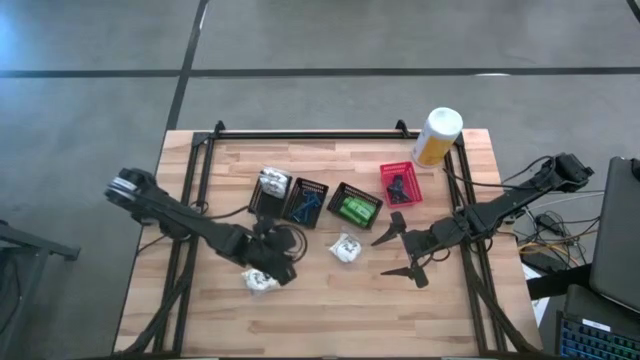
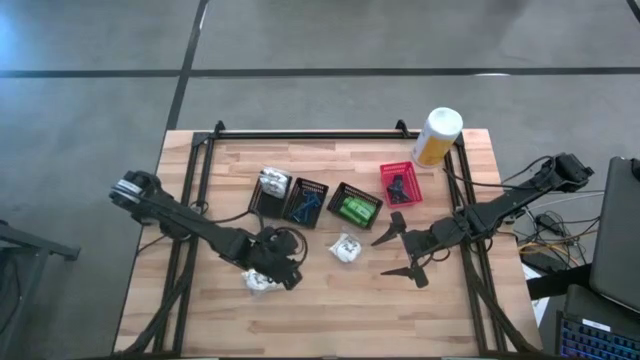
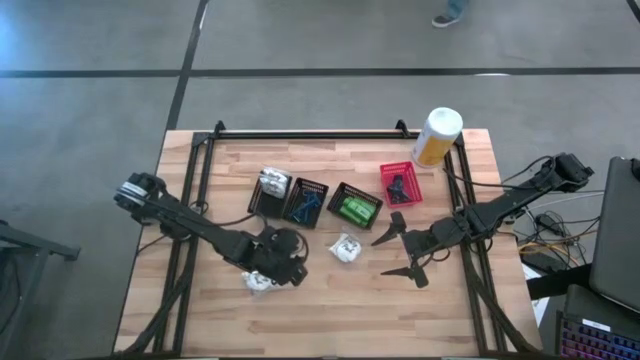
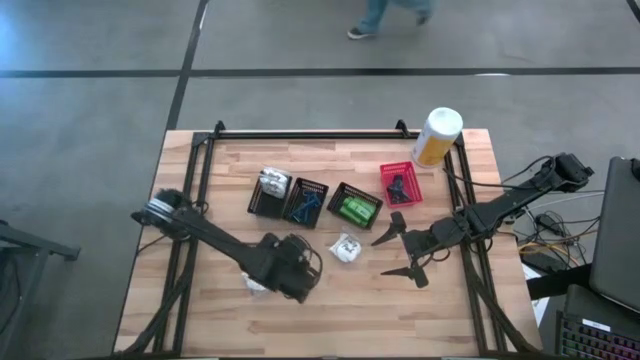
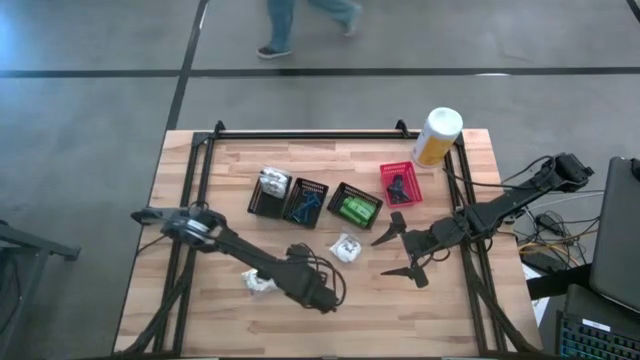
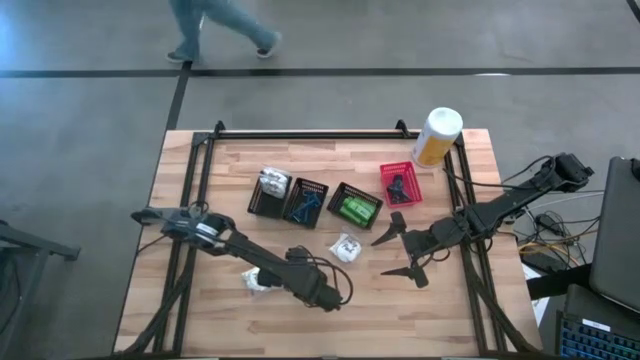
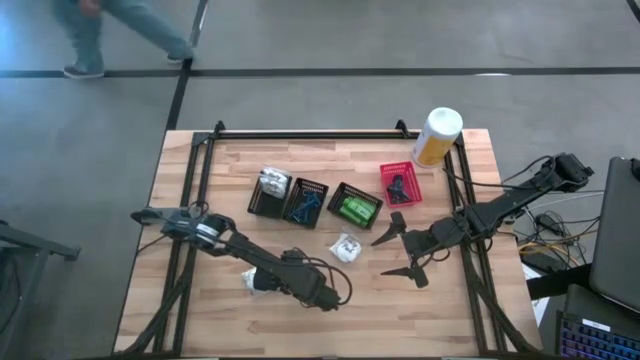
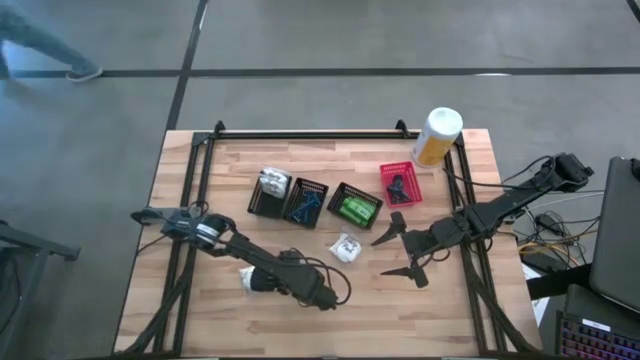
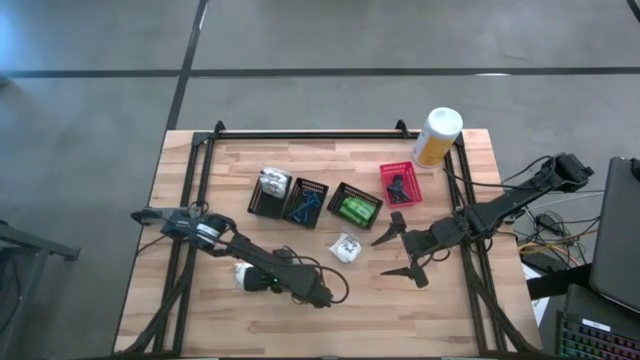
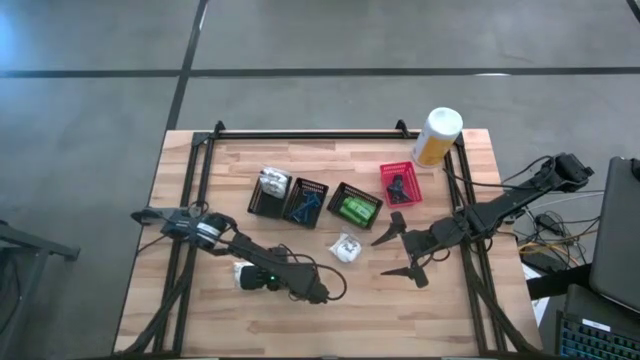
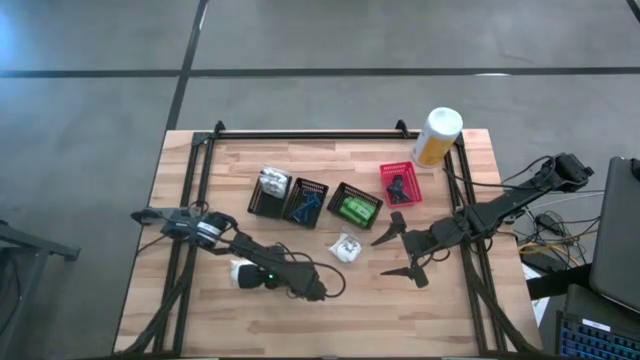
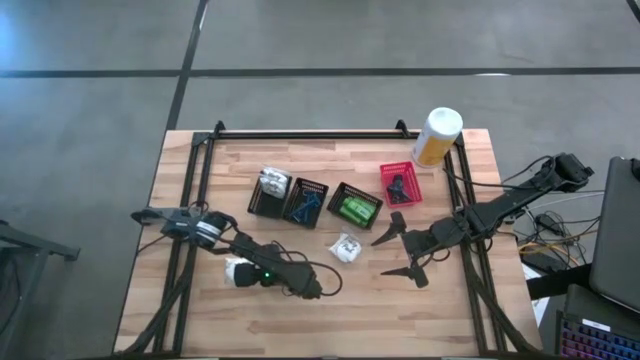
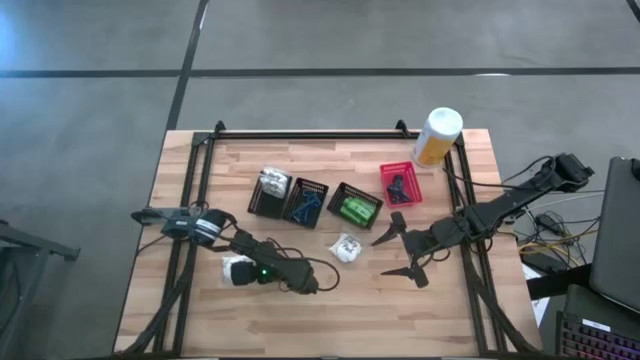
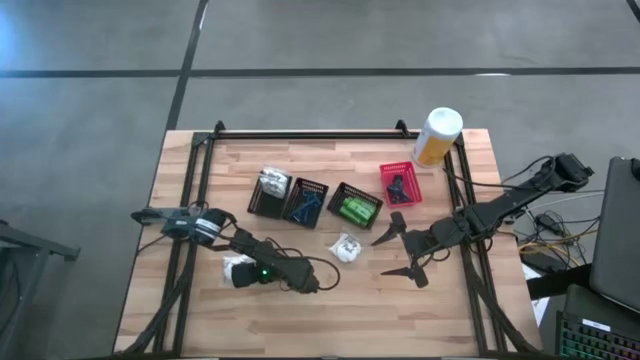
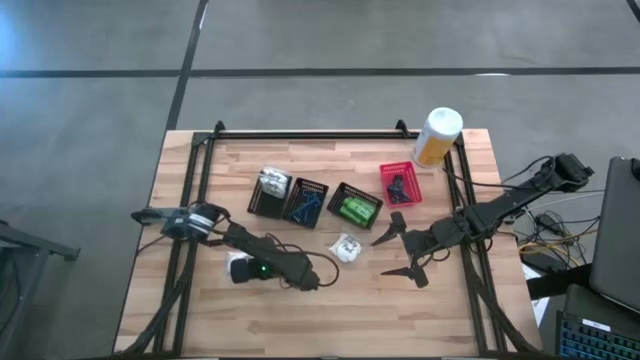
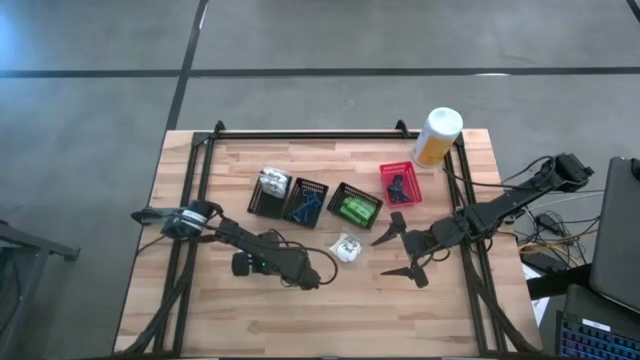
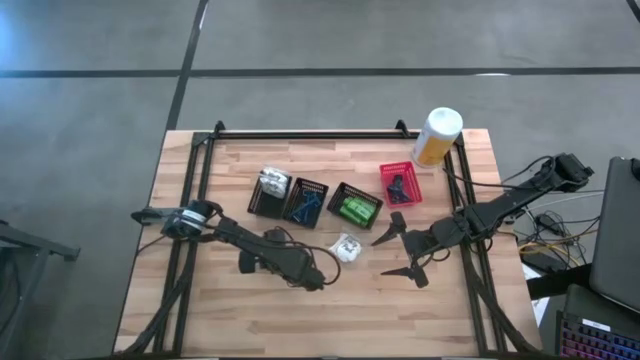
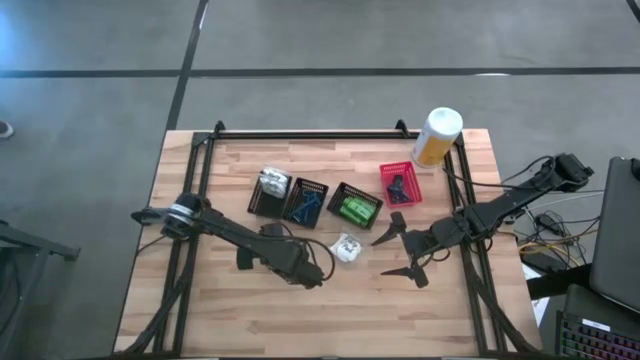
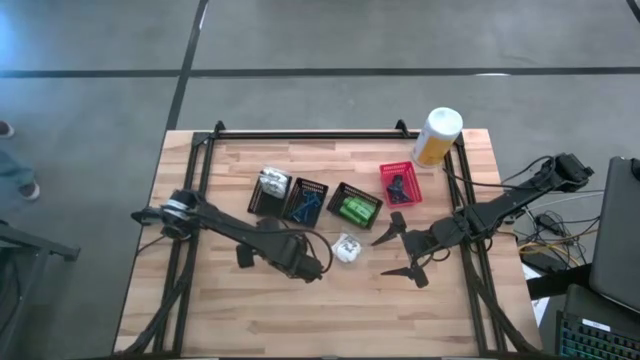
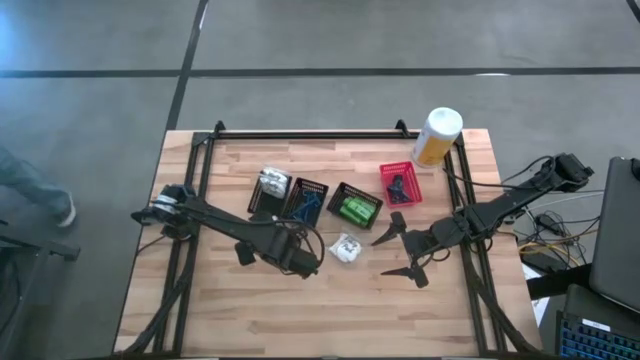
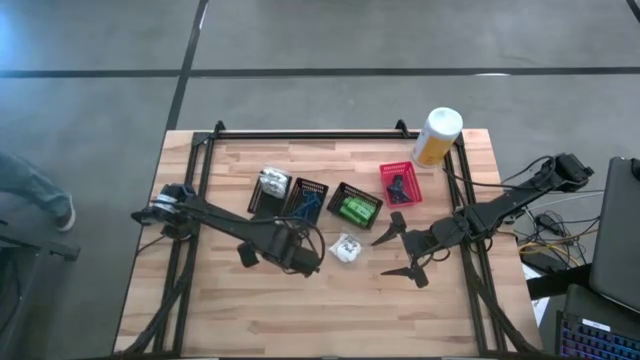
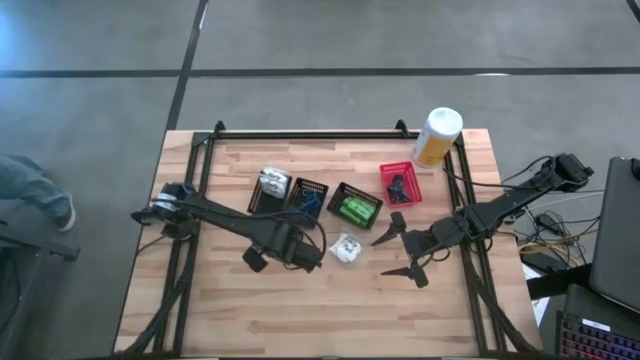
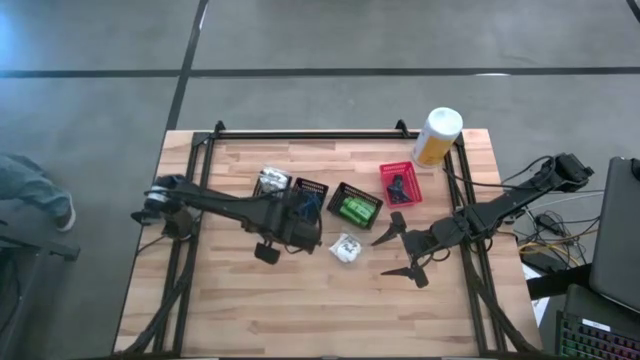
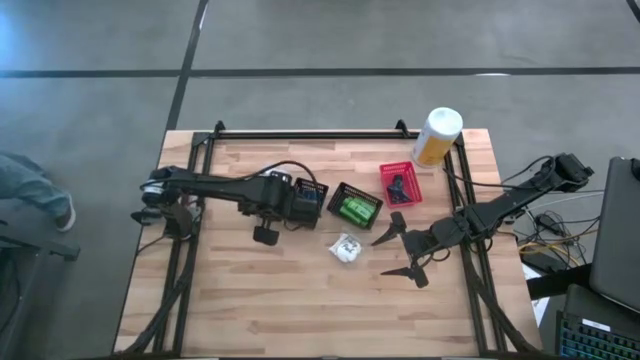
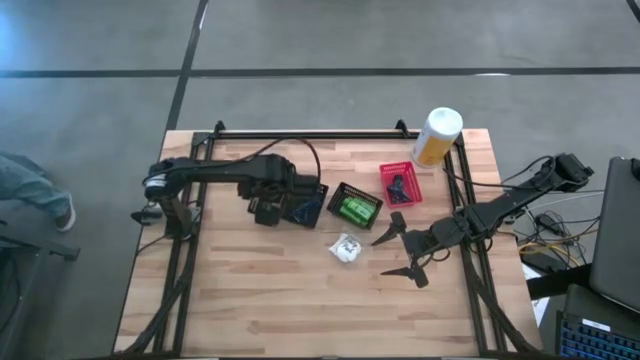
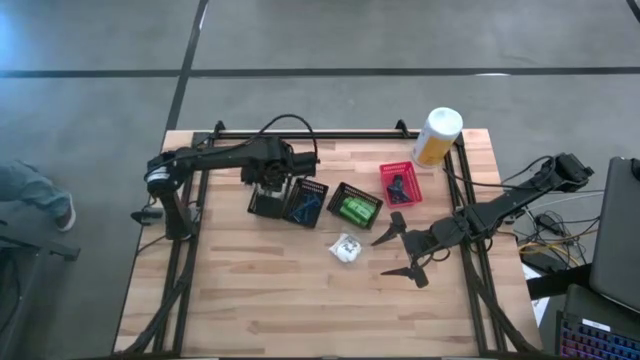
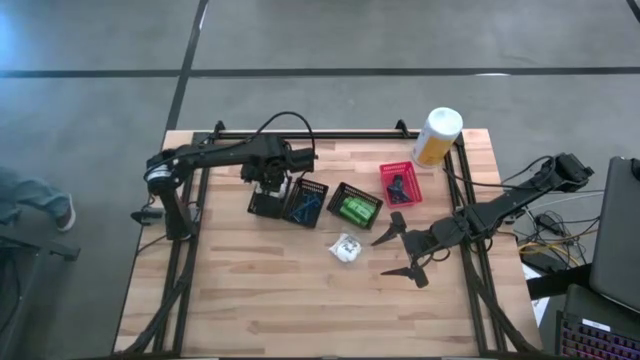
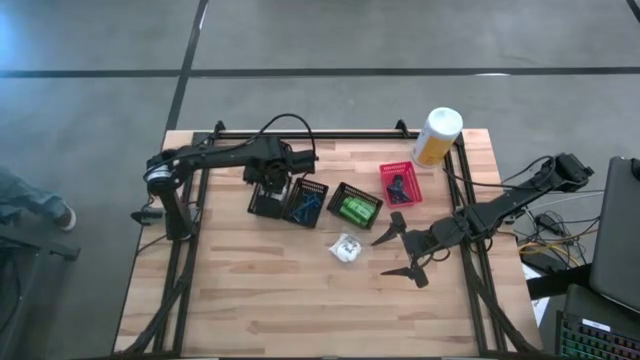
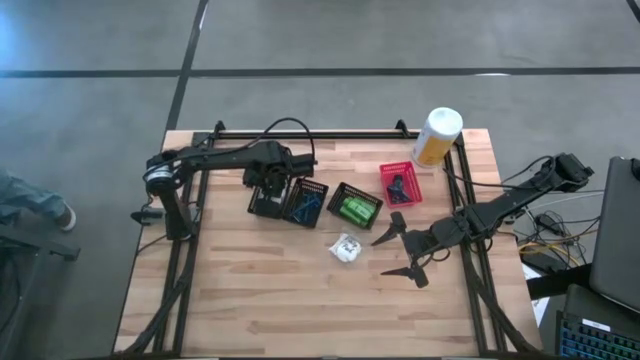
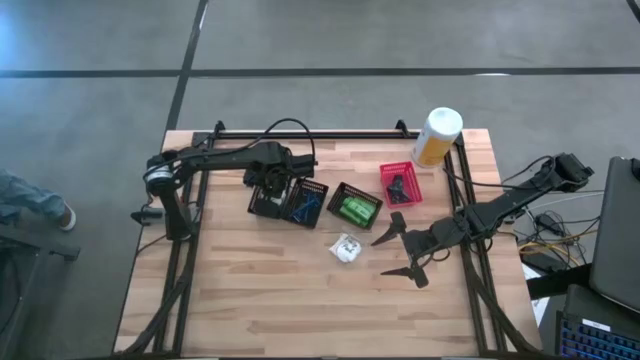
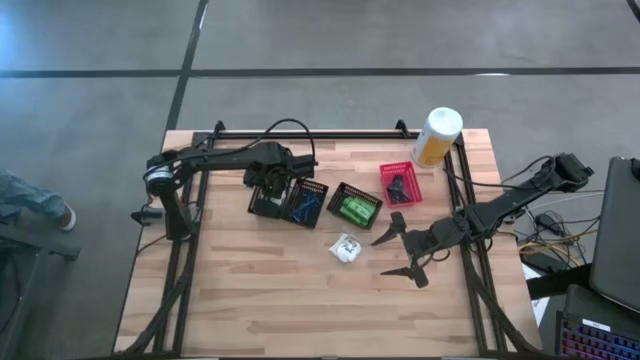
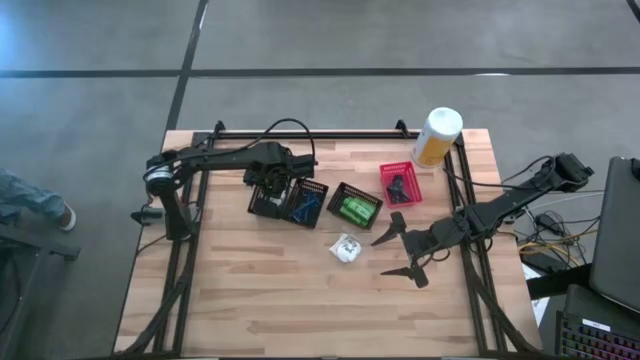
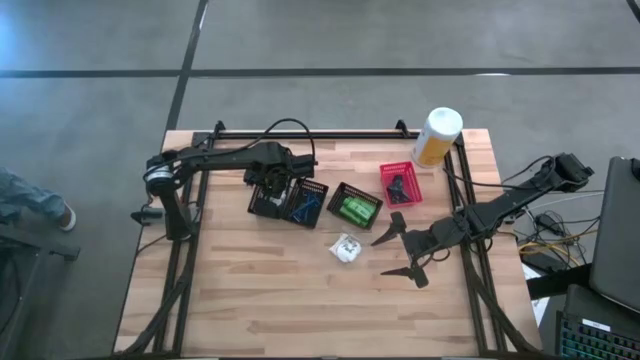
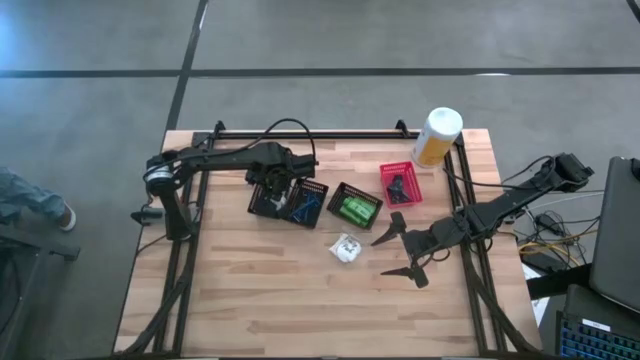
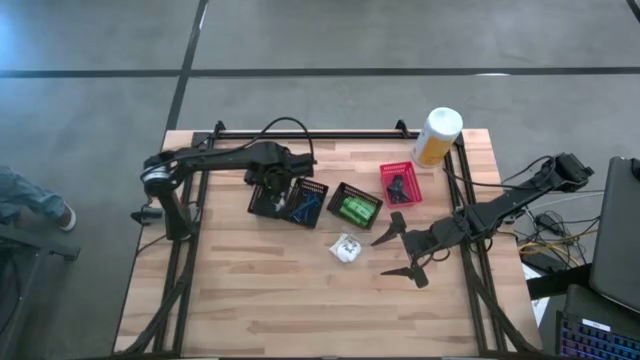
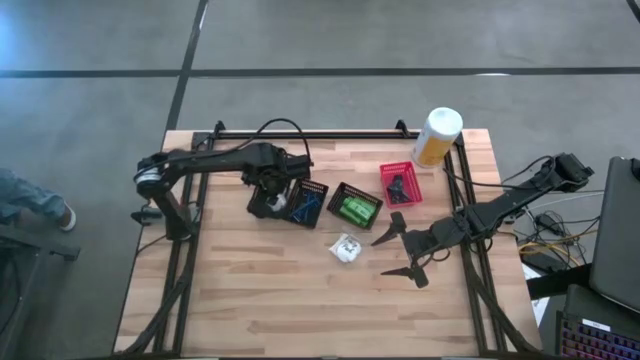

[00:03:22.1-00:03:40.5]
Task: Pick & Place Travel size toiletries
Put the middle left vanity pack into the left black bin

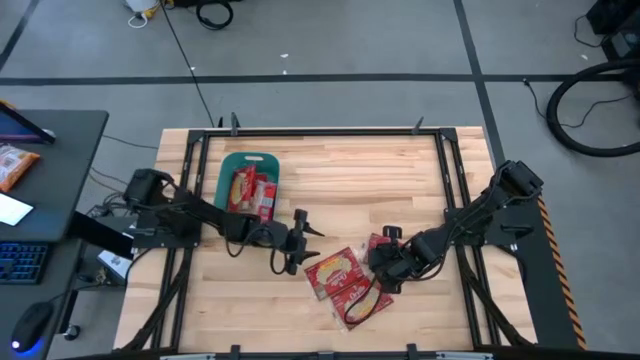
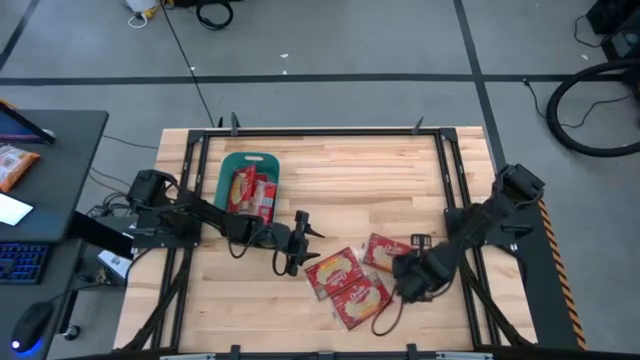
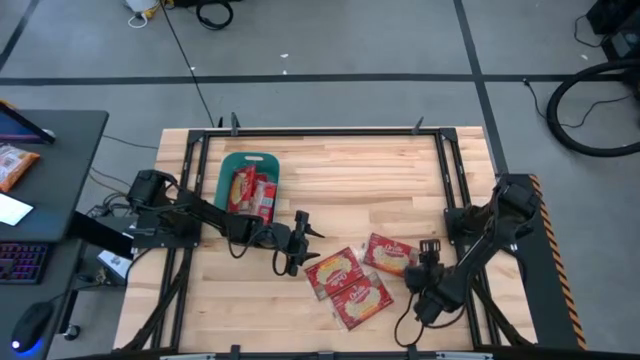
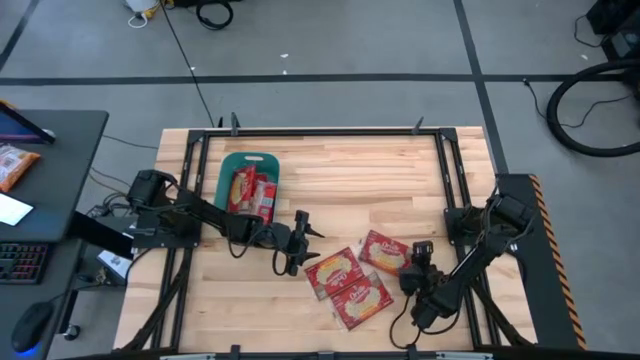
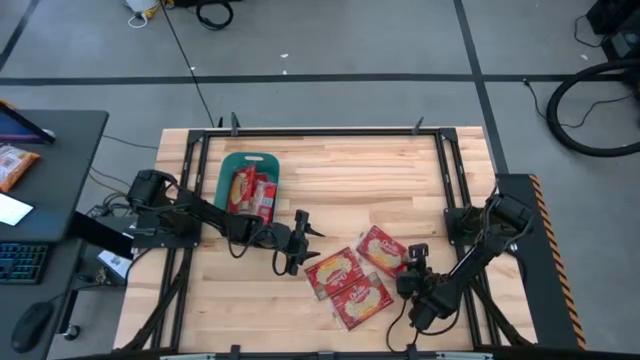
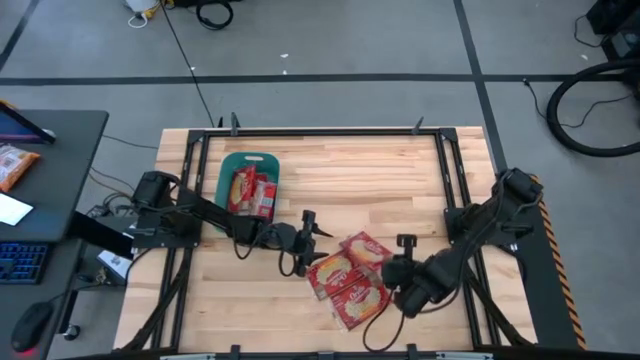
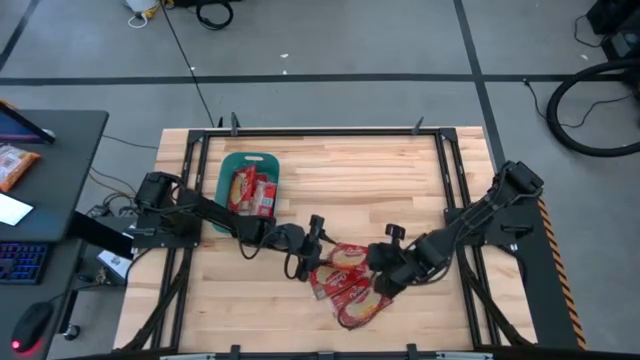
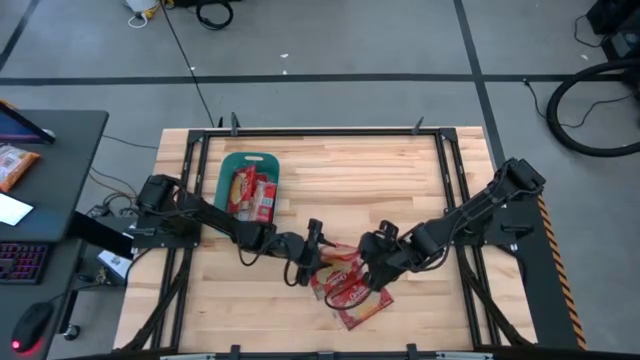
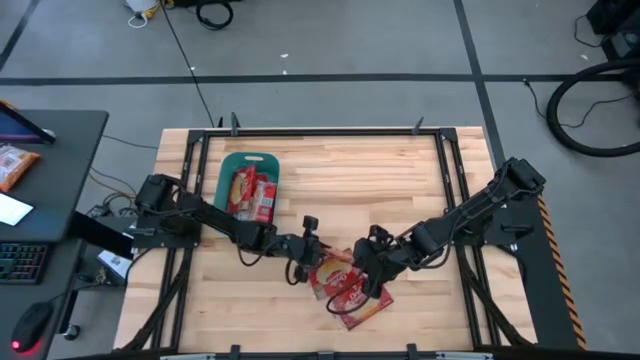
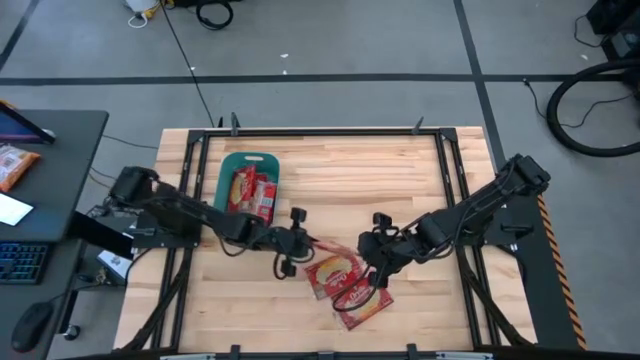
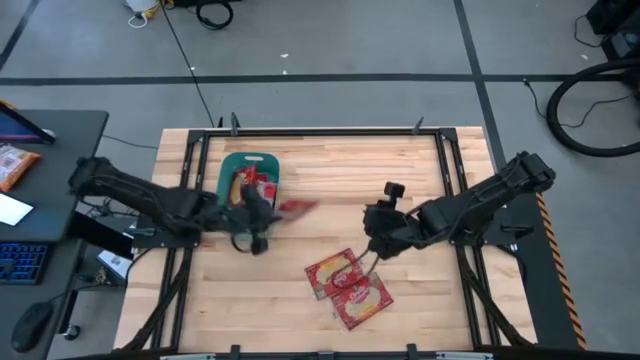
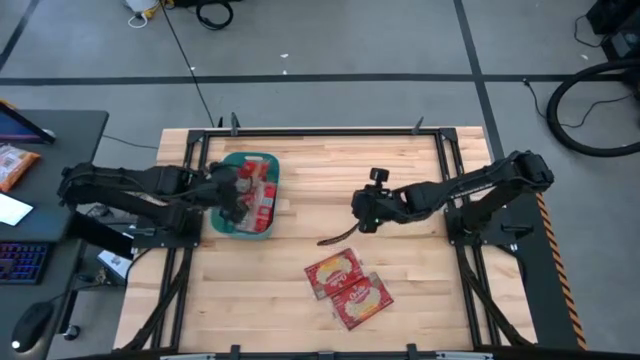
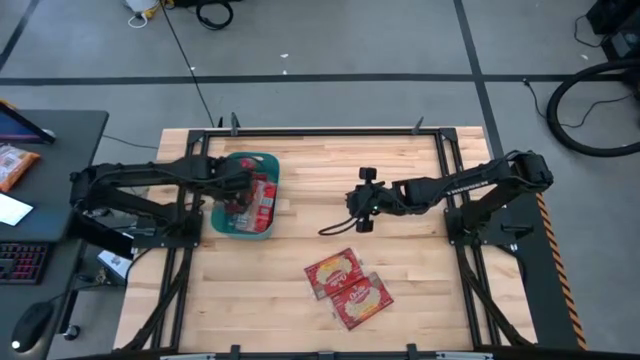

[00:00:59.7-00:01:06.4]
Task: Sort popcorn bags into baskets
Put the red popcorn bag into the green bin
